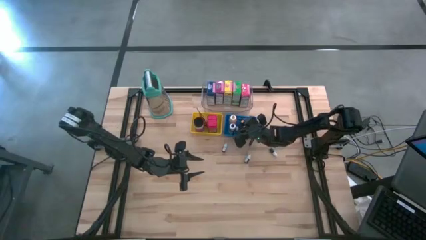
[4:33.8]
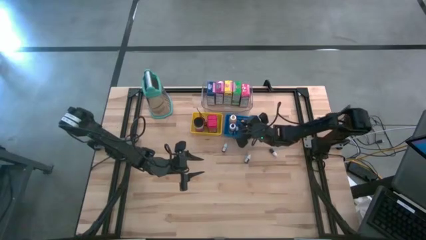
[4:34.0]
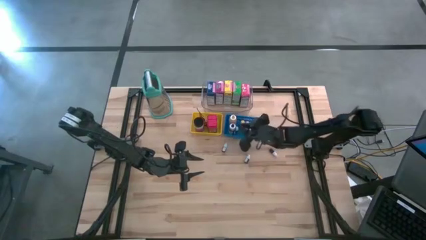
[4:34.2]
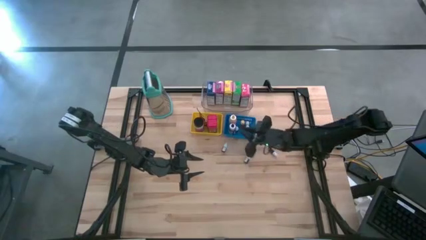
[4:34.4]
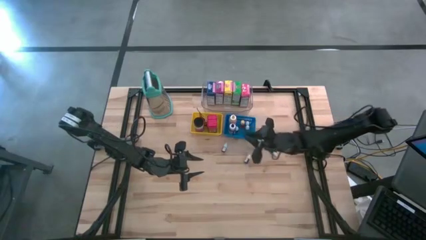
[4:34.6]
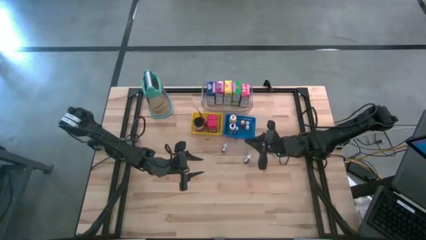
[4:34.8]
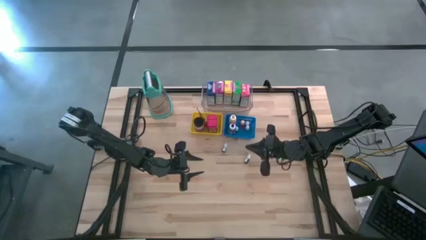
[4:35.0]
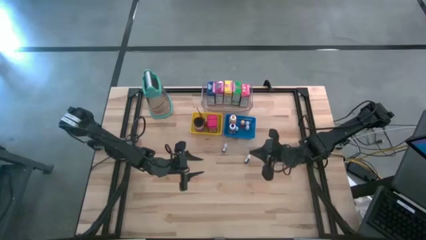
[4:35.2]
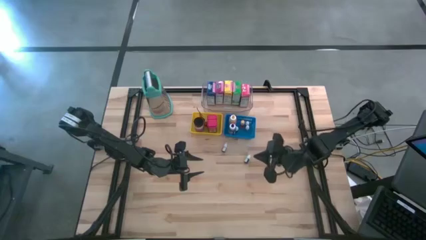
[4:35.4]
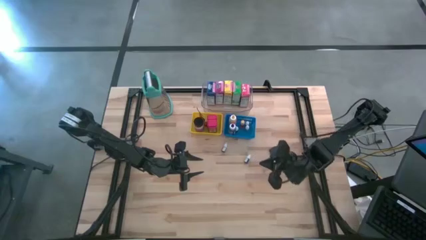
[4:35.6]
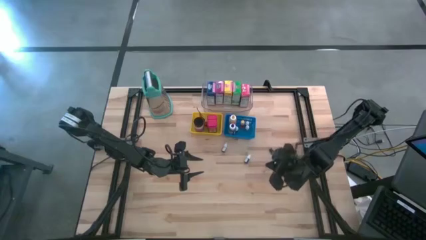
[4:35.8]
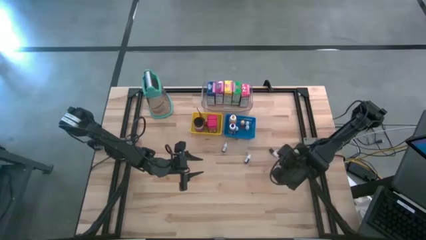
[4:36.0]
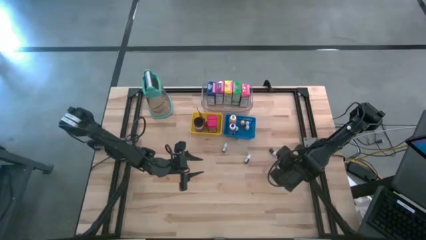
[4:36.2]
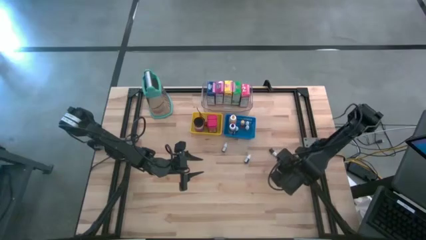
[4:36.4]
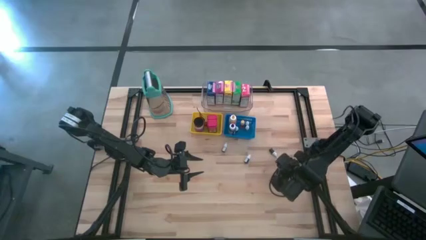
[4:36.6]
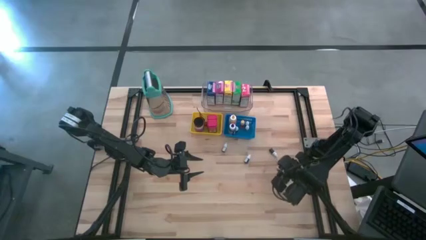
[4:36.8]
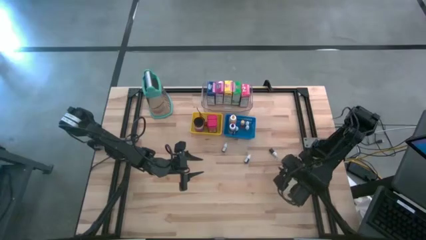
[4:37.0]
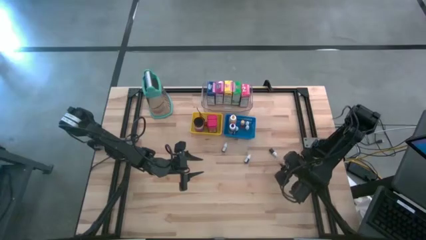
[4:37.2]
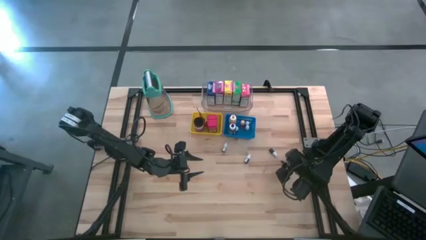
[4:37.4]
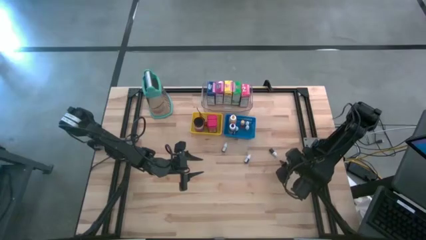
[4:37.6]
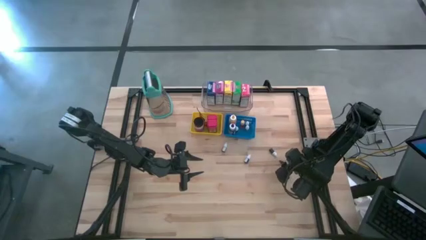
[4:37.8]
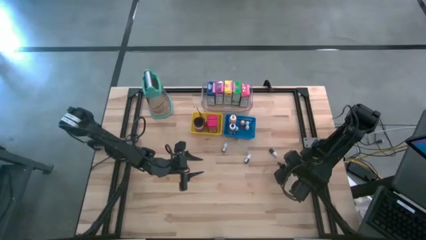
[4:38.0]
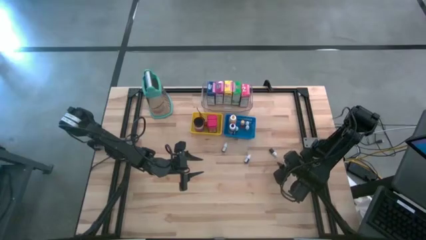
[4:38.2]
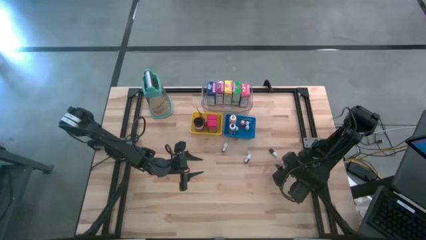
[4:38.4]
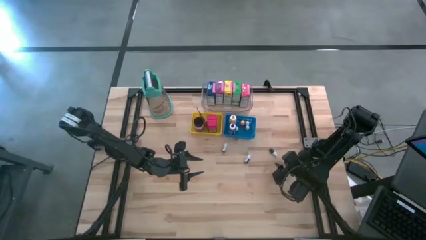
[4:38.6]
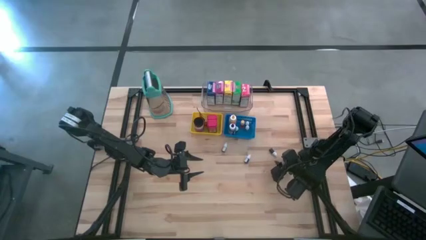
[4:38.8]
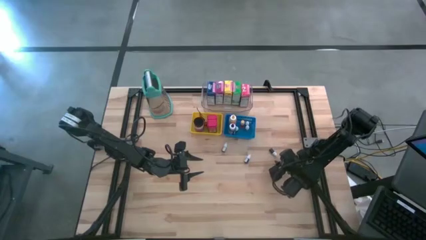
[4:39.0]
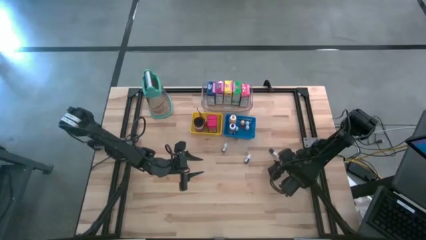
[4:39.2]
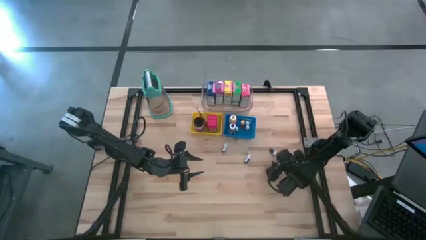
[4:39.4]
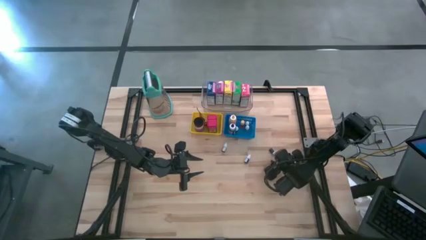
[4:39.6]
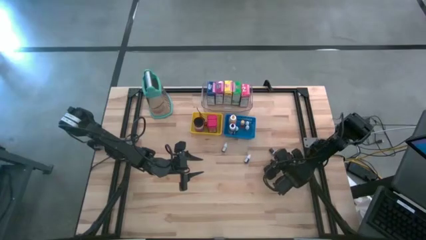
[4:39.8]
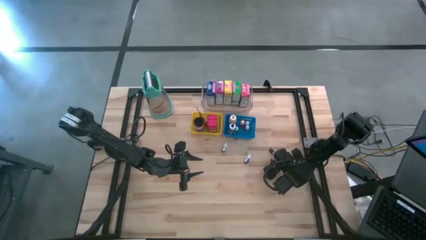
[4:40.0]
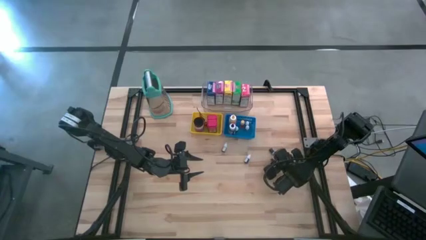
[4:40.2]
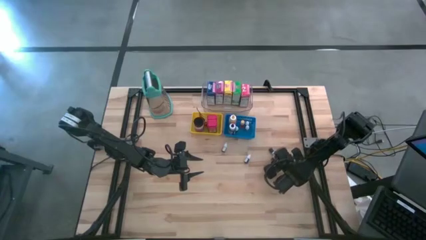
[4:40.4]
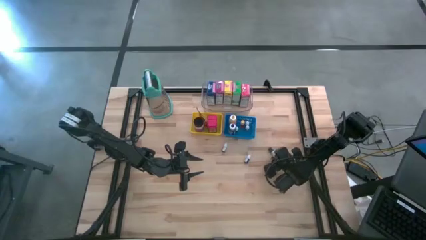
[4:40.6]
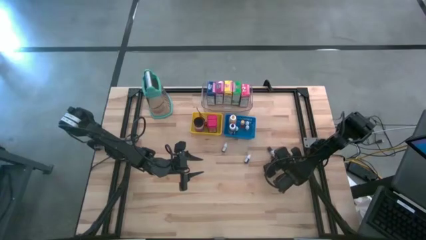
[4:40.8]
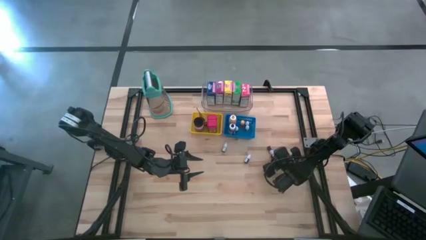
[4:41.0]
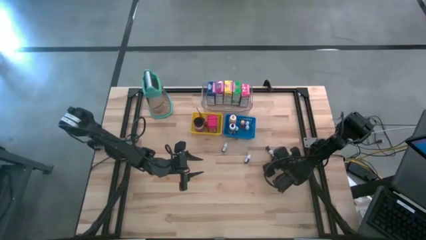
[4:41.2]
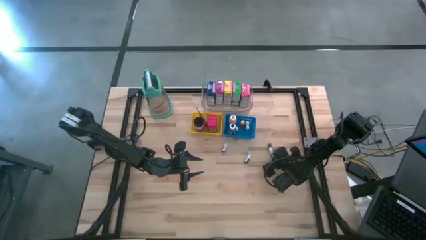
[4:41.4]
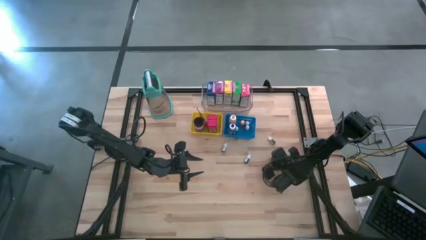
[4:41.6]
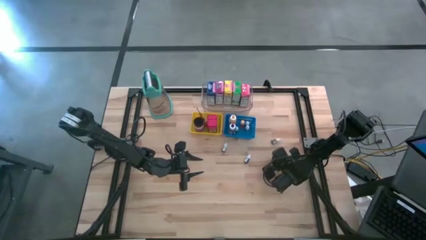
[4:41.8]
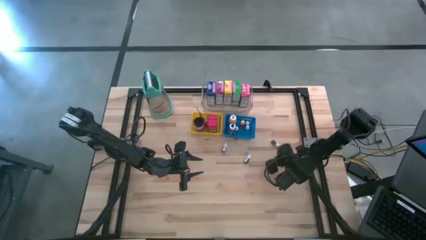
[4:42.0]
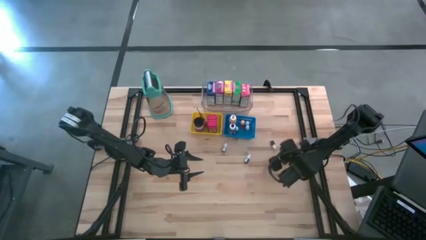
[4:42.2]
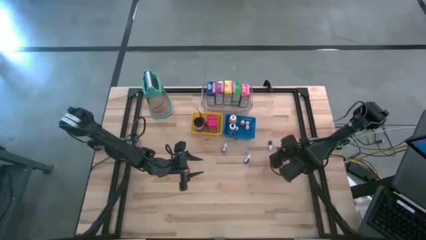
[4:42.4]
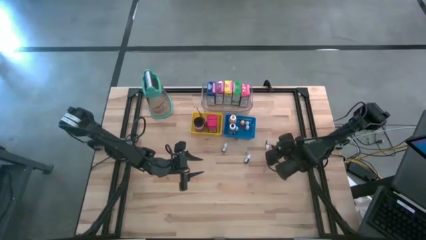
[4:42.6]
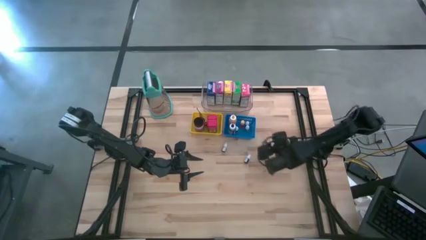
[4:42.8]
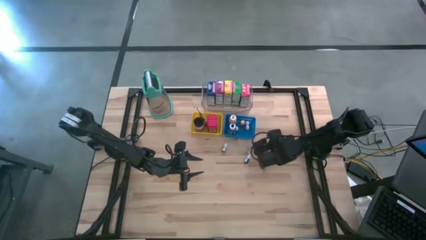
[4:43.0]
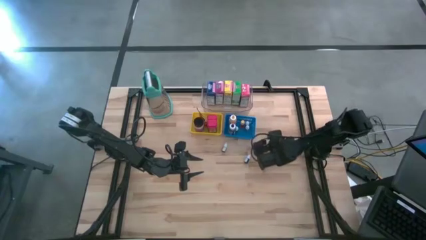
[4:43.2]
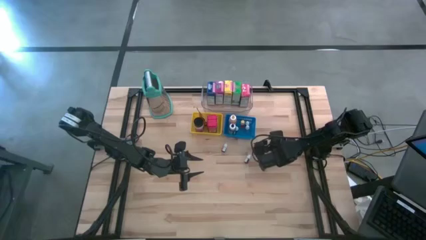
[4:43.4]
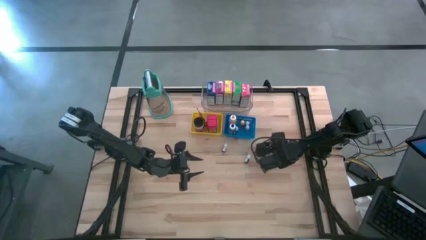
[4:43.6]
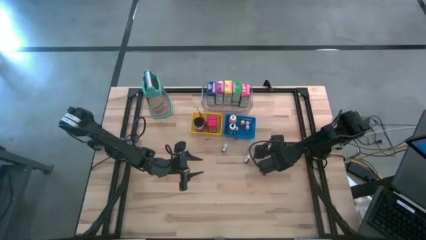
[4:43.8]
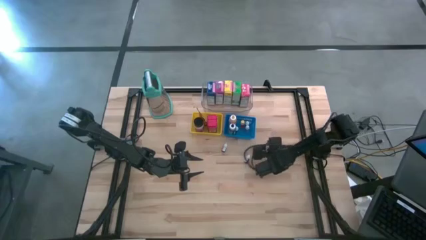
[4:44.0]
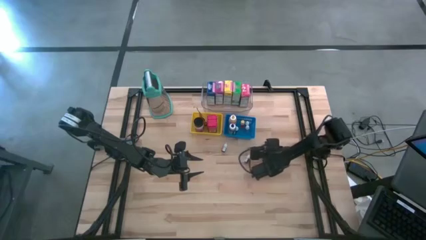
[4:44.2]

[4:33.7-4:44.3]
Task: Pick & Place Kitchen Items
Put the small black food coloring bottle into the blue bin

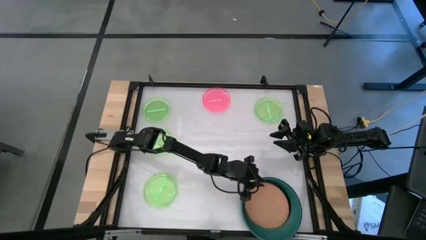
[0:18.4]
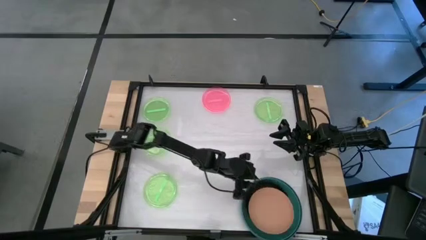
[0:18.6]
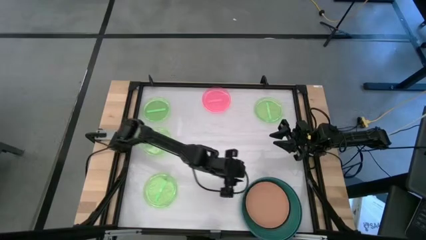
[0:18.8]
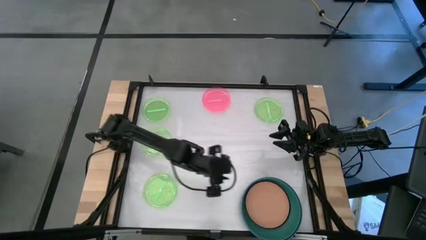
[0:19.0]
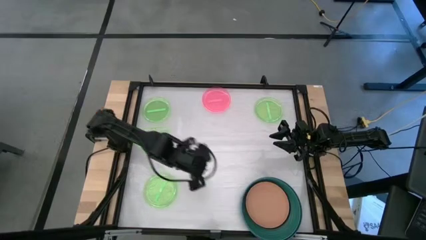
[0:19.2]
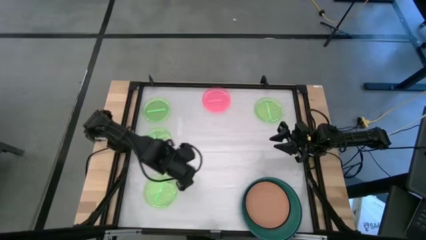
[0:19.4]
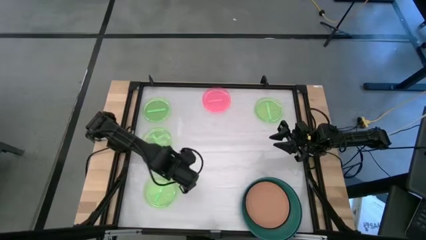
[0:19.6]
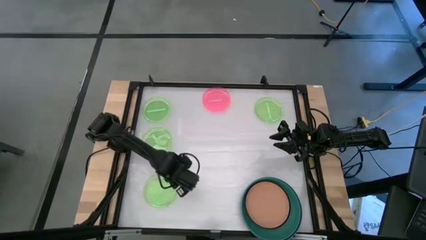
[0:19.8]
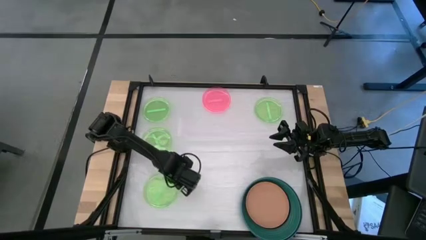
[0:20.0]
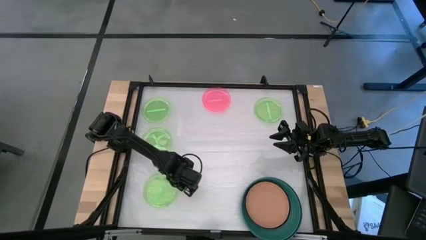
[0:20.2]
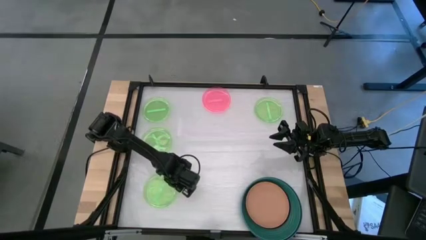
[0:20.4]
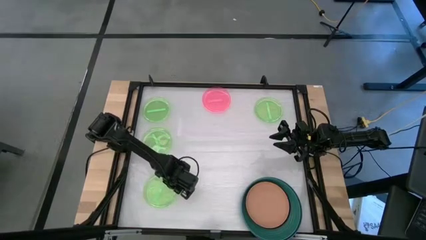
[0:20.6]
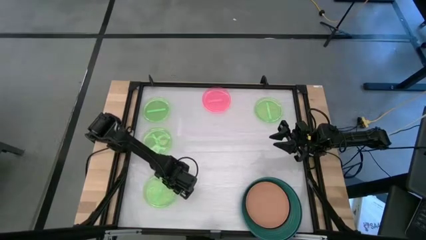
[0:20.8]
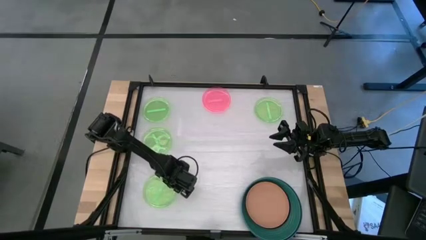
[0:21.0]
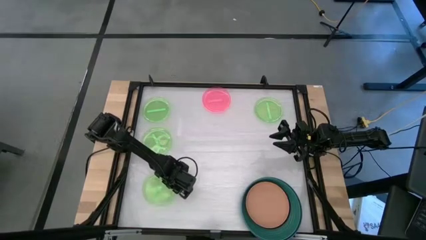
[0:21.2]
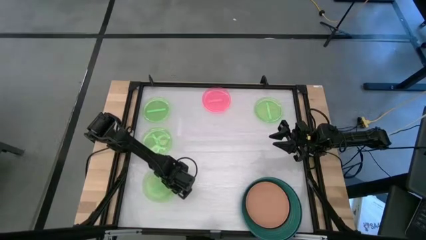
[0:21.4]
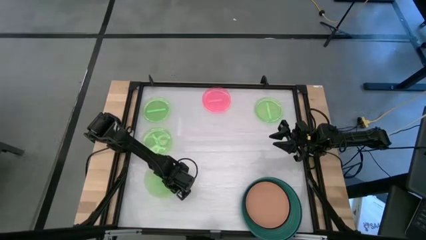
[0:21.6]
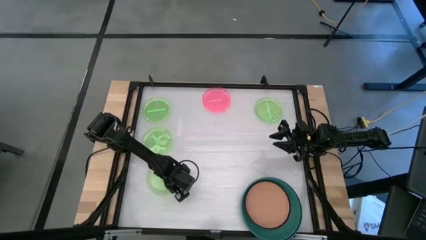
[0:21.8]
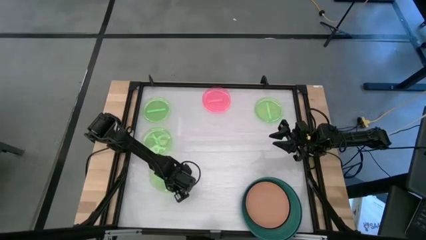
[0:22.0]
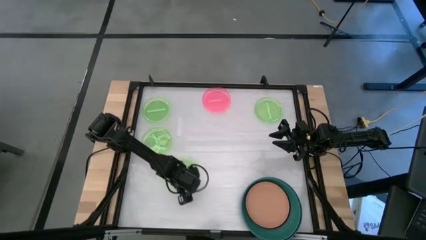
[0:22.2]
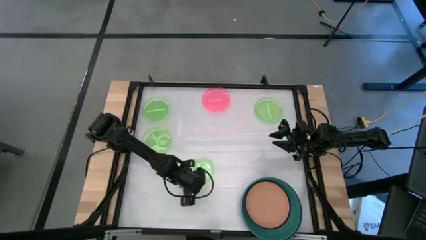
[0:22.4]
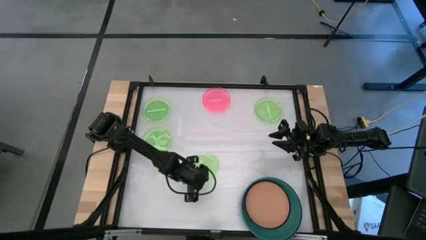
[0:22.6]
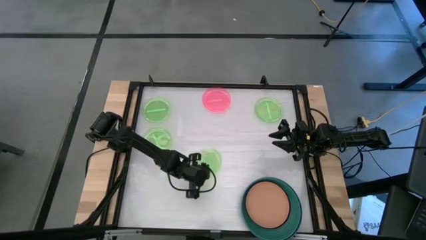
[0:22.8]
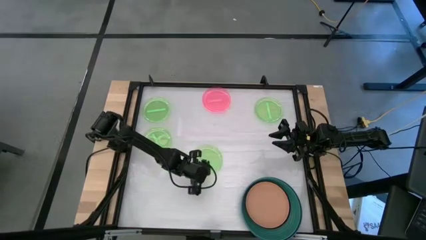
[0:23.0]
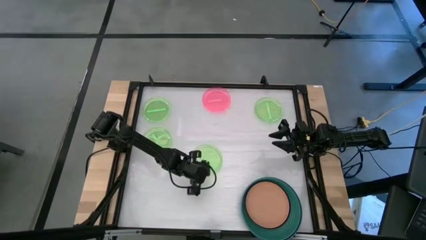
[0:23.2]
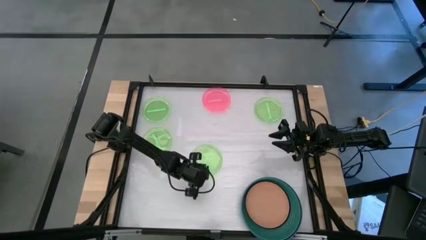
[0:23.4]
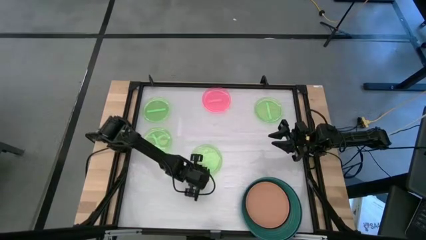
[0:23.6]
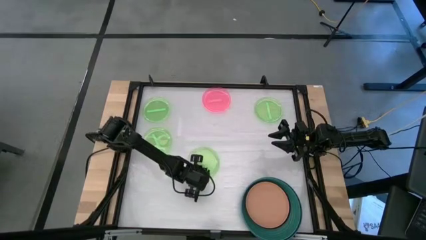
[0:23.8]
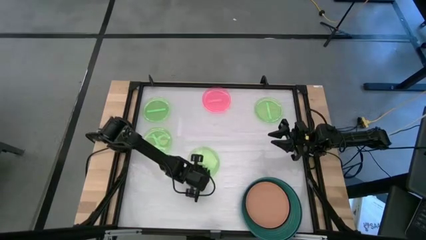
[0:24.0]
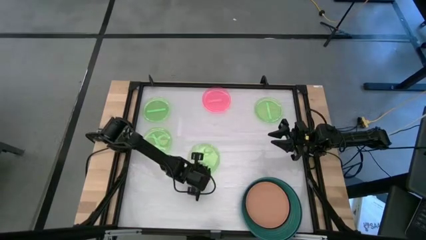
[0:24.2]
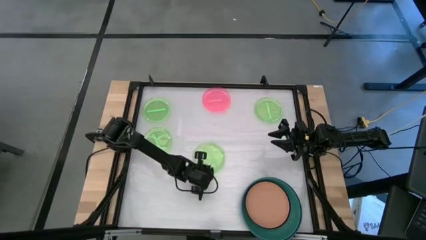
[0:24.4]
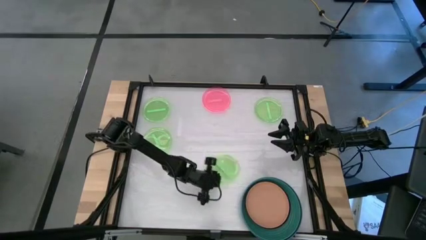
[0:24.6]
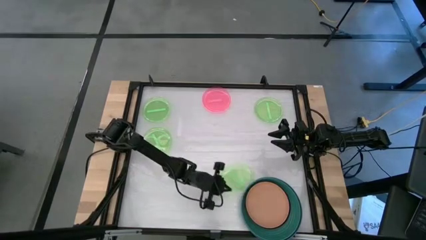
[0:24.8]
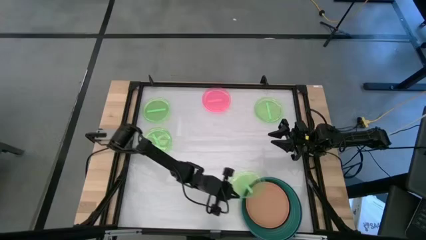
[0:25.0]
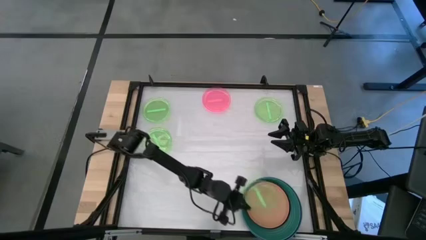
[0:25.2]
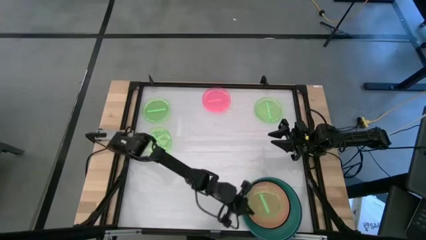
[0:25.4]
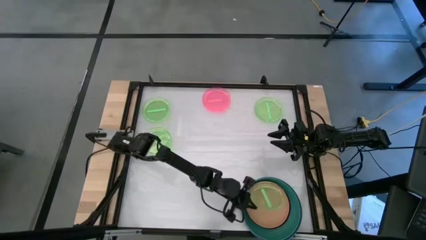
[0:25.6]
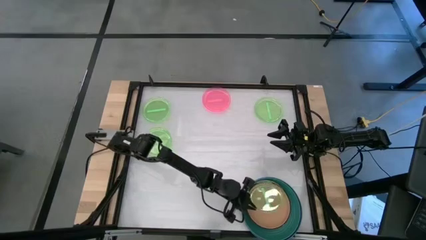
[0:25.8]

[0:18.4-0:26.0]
Task: Stack plastic plates
Stack the light green plate on top of the brown plate
